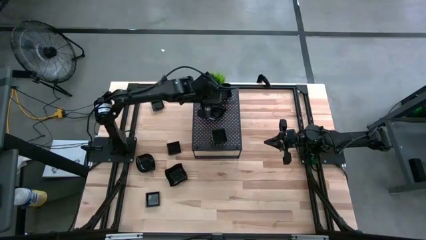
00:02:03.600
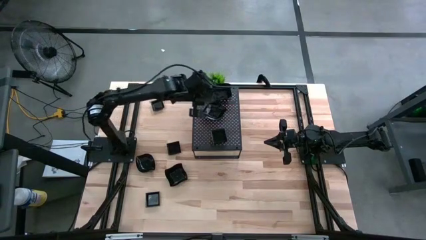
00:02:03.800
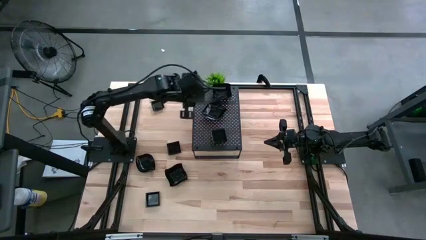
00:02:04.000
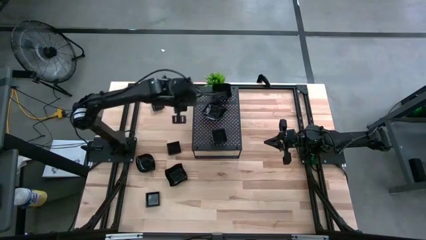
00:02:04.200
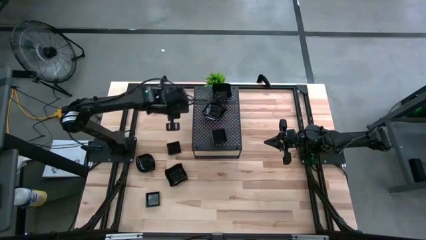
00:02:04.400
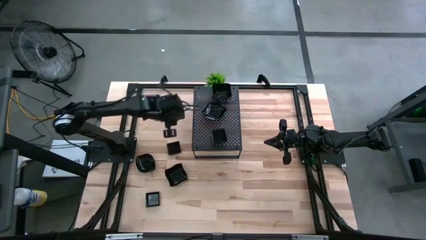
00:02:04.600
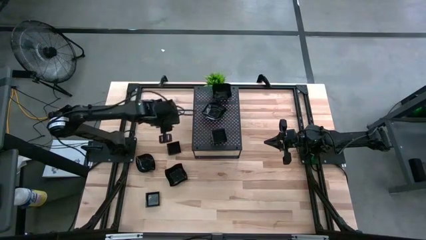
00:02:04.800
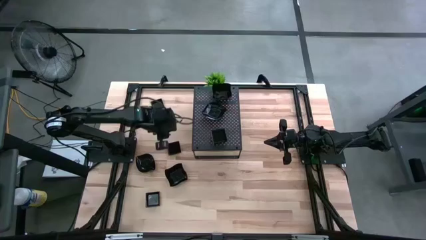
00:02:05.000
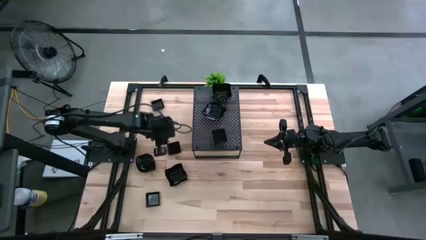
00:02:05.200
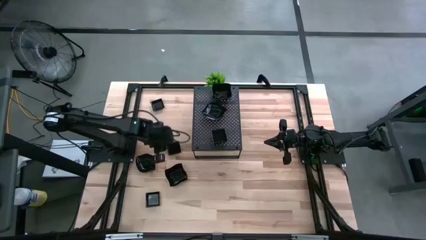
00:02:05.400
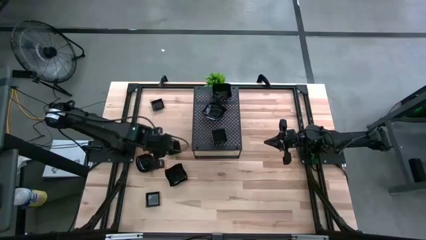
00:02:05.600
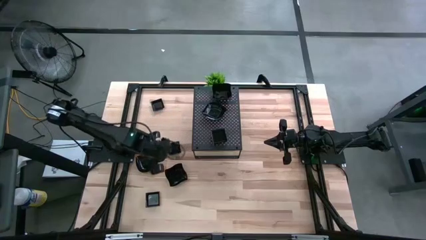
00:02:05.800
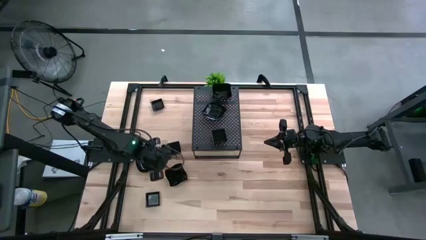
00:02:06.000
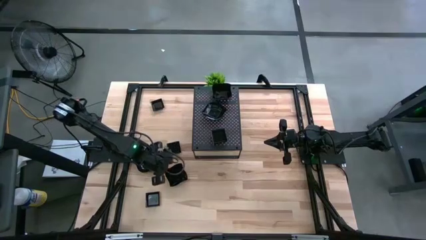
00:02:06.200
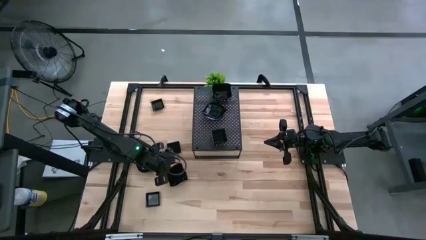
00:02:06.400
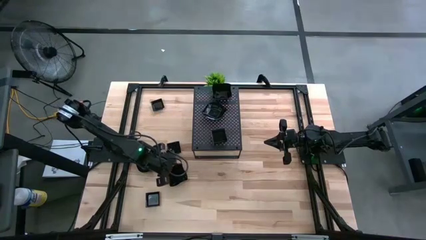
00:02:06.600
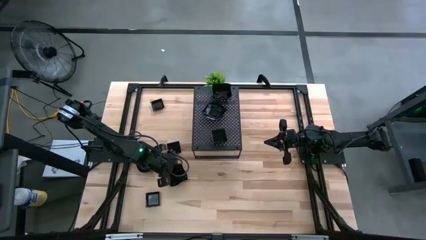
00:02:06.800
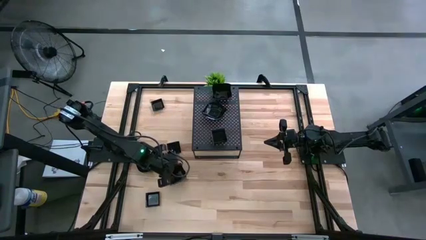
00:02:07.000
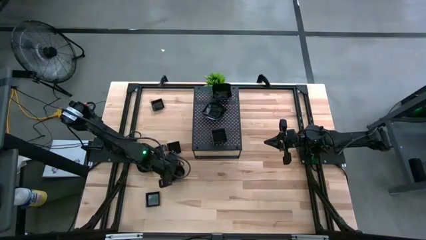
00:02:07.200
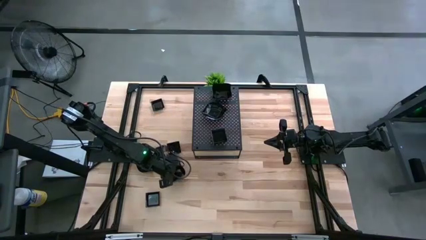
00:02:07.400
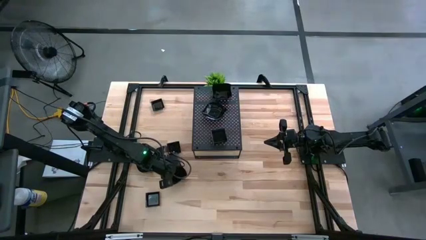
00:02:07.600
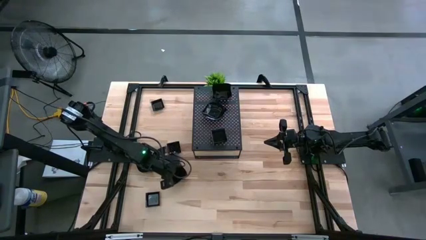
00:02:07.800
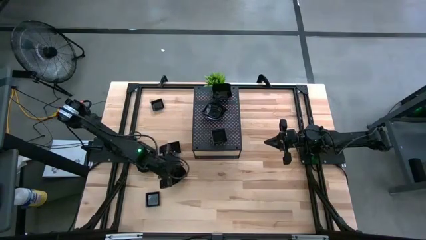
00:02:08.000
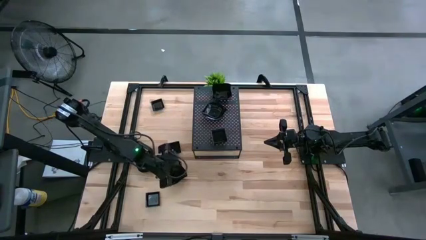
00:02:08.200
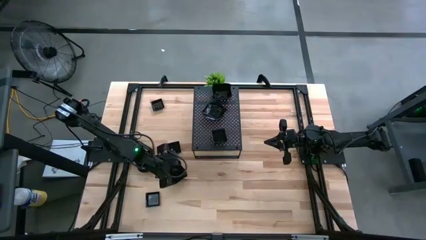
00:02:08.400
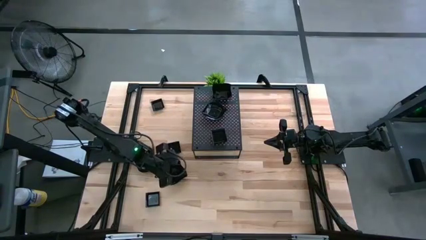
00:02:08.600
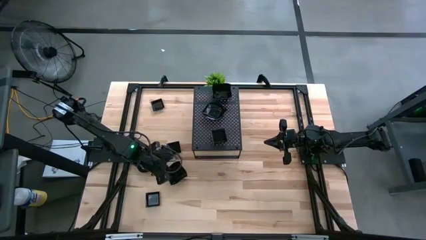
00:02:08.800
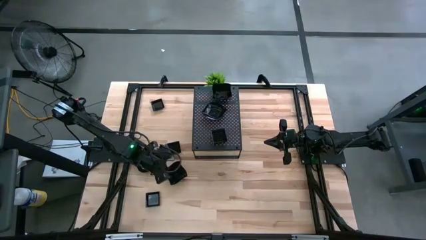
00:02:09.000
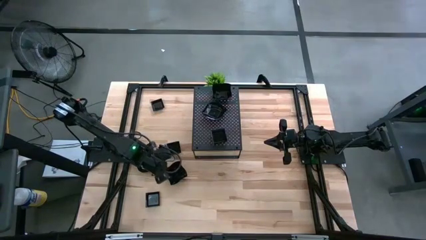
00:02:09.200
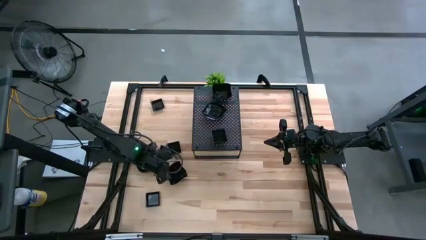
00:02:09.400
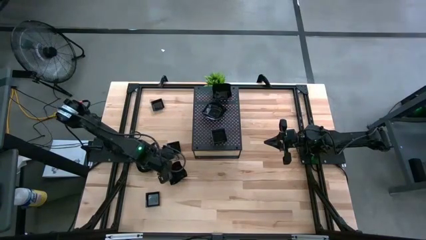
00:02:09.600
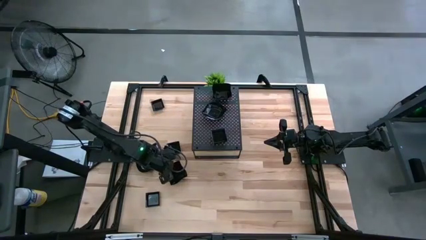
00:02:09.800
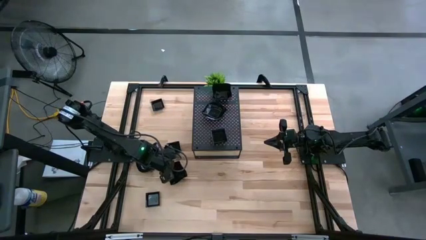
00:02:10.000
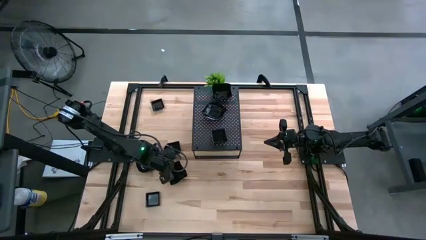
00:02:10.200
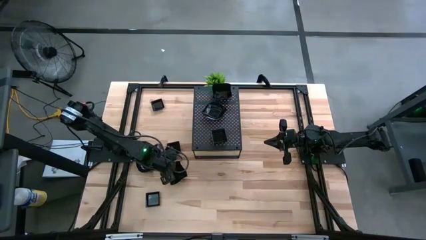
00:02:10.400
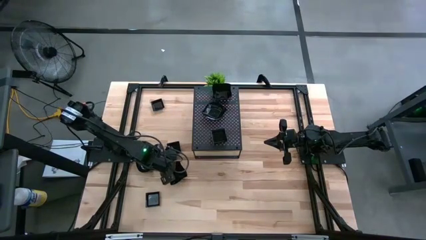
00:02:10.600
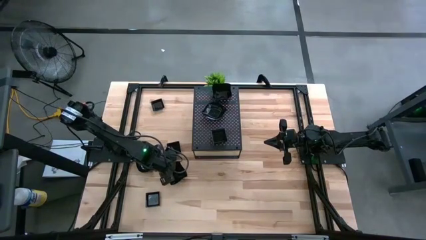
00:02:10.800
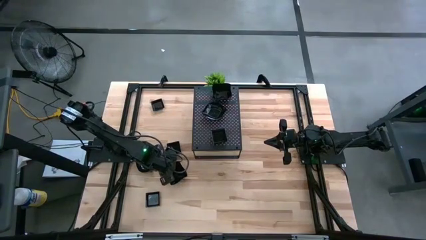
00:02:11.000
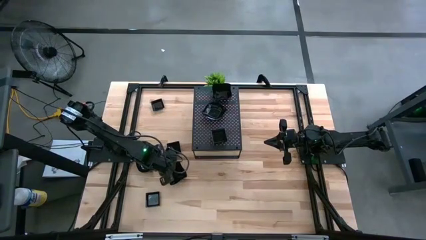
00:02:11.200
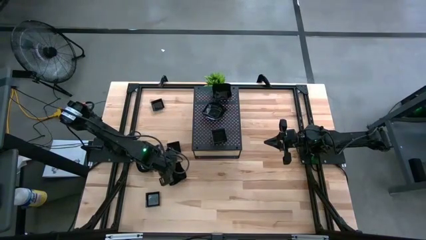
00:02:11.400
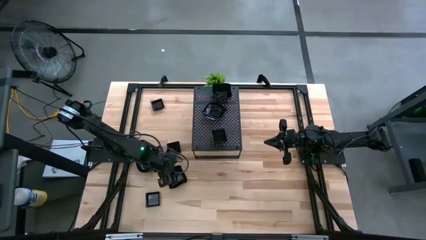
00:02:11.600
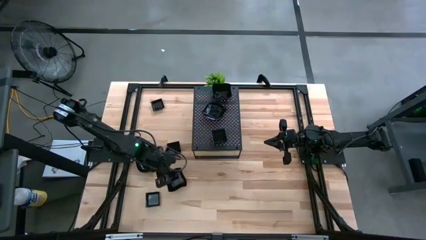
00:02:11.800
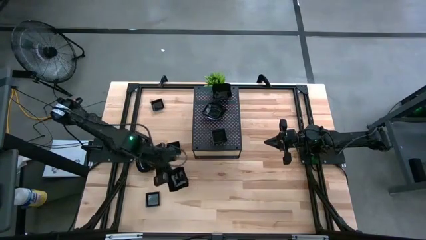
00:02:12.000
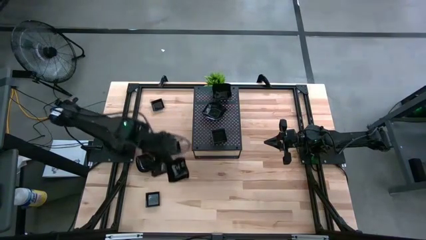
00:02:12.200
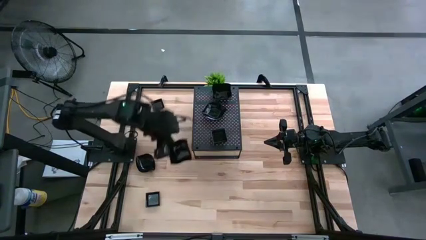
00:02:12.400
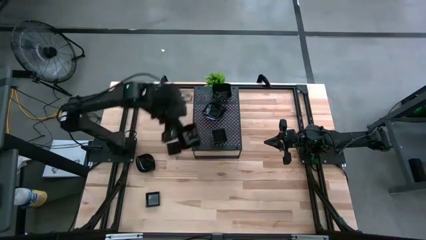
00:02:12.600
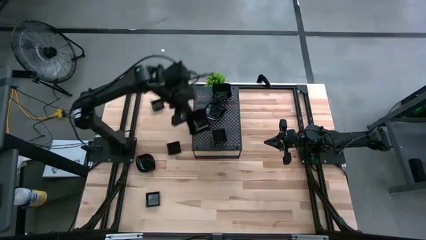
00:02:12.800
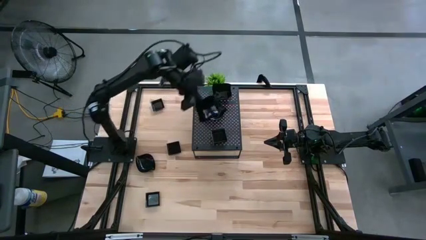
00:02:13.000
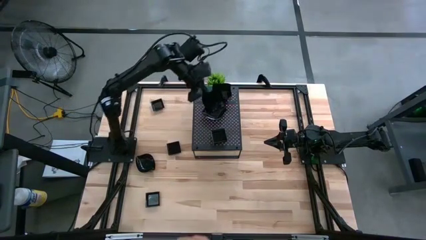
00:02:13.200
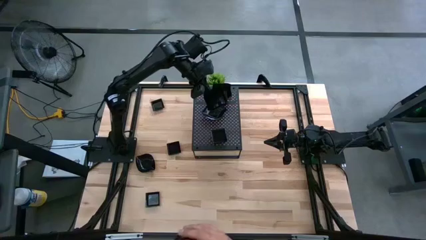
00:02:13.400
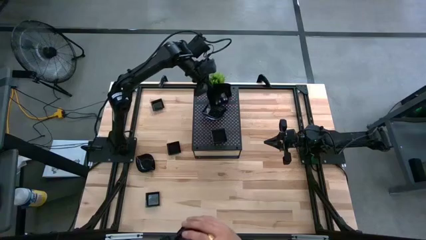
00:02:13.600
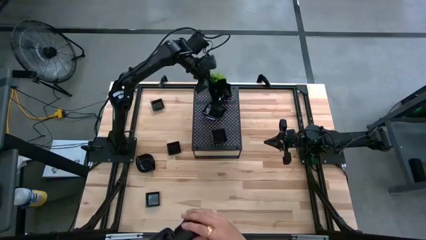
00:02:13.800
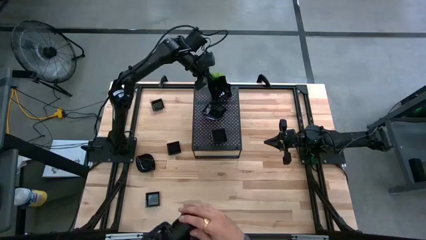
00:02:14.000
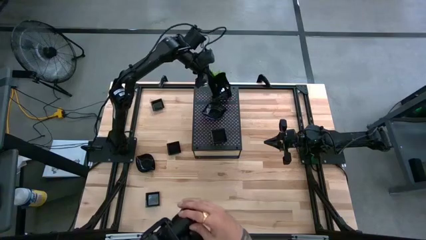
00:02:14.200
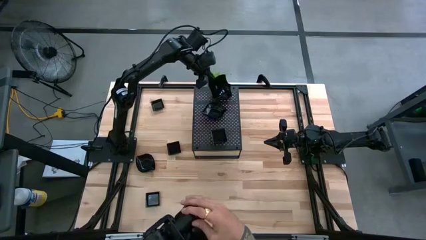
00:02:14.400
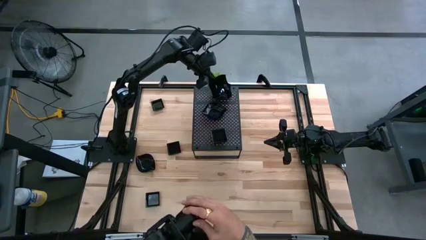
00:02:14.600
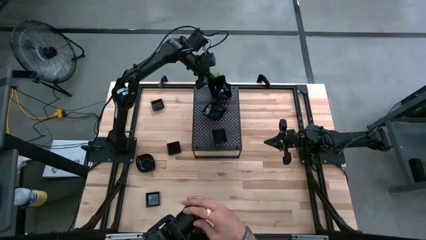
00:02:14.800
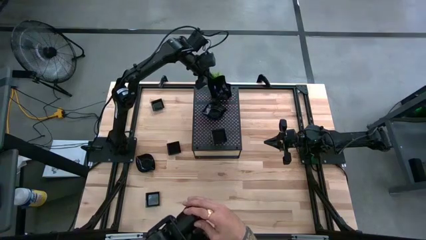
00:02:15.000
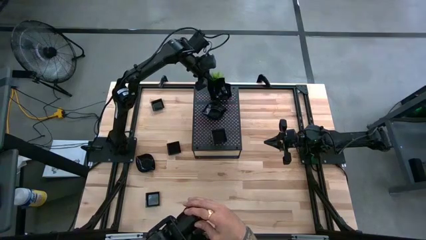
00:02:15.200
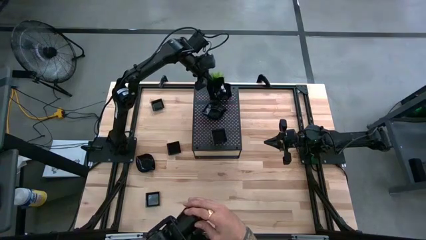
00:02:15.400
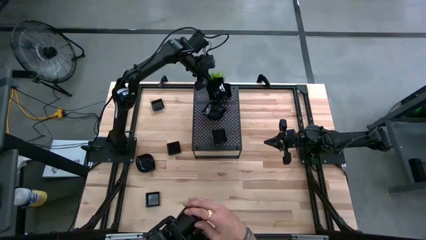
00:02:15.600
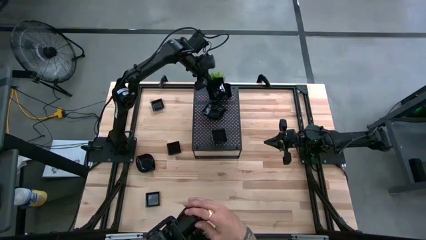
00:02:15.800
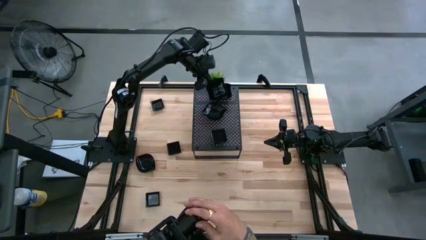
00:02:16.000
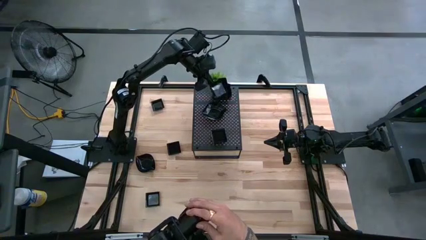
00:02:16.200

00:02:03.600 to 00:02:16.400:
Task: Pick & Place Mini shaped plates
Stack the distorted square plate on top of the distorted square plate on the shelf

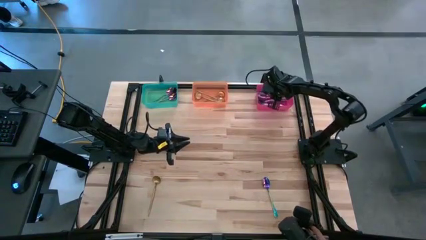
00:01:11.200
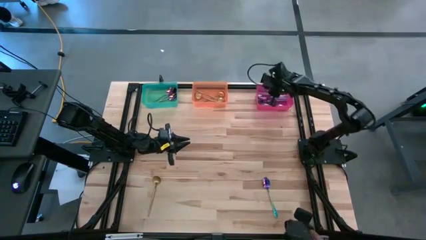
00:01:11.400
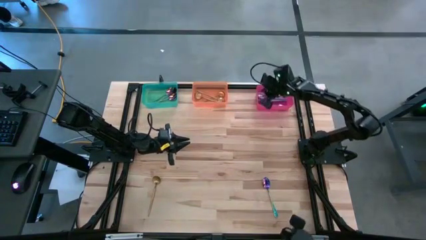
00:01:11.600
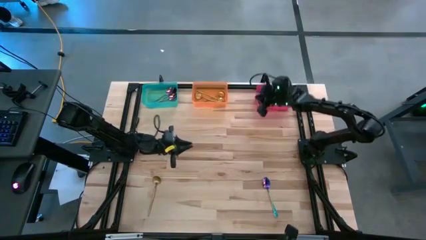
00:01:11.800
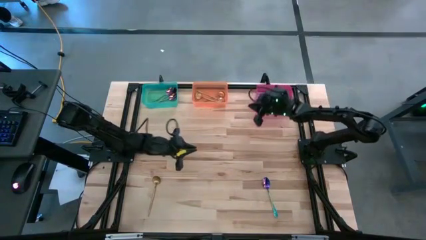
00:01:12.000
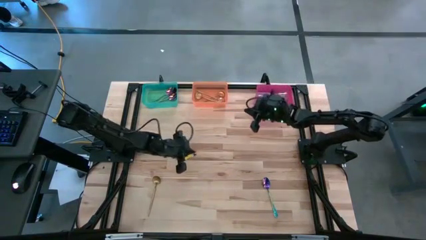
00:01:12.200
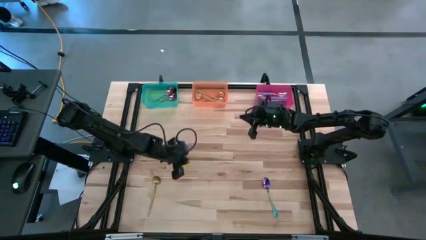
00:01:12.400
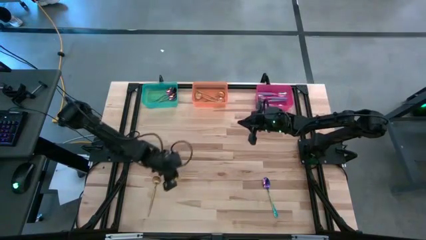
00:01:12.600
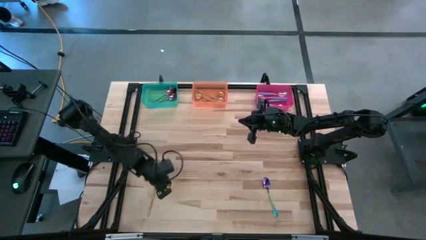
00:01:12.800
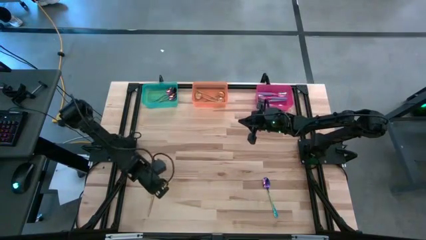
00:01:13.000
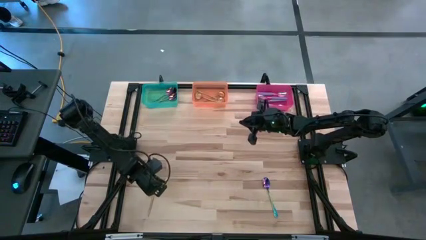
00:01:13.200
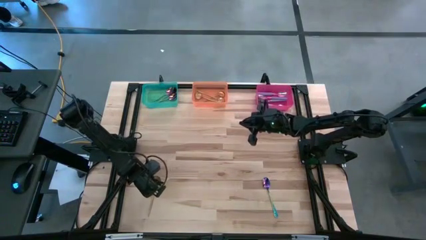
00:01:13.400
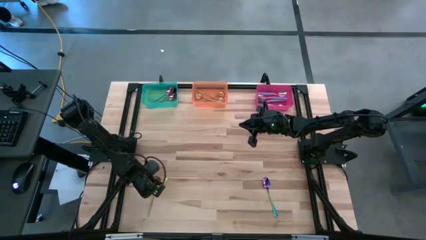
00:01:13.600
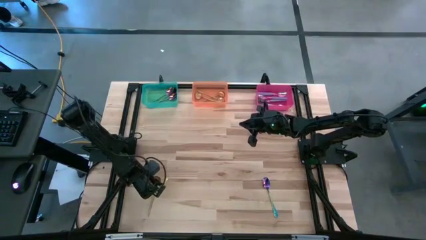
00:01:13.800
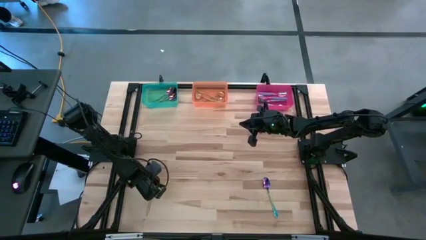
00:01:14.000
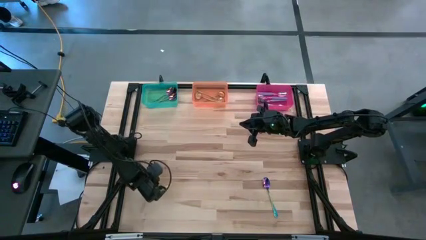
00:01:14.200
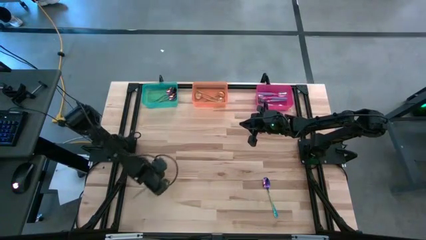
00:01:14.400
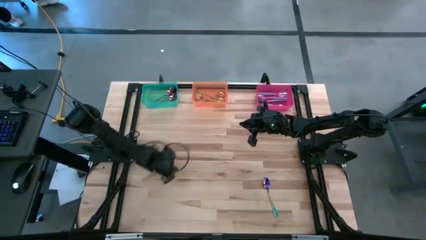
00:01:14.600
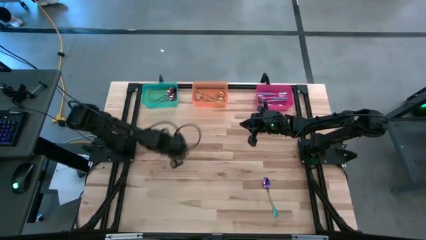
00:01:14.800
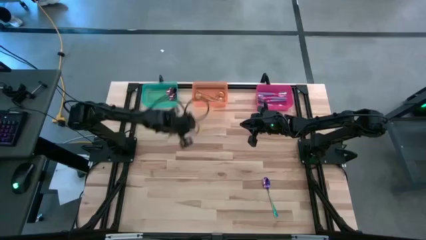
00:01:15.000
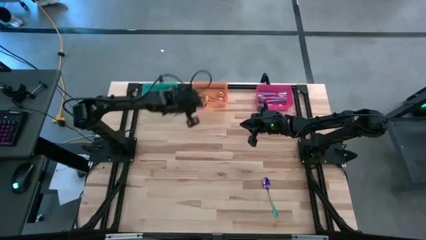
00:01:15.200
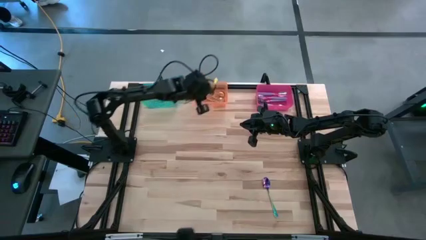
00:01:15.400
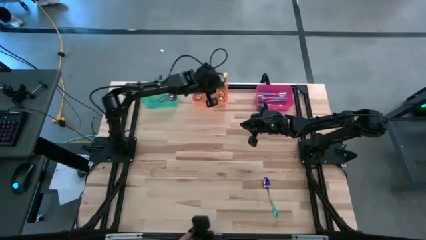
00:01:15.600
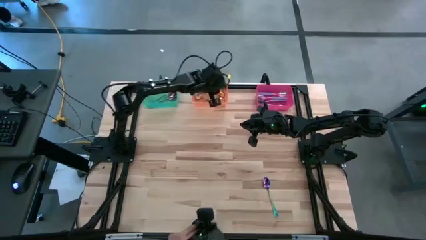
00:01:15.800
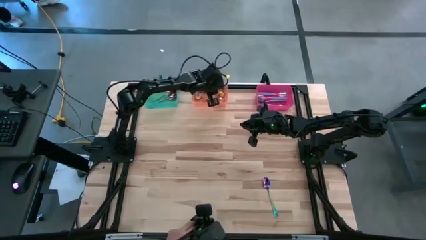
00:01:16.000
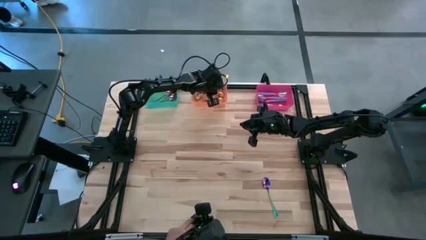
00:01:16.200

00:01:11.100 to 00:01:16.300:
Task: Sort silverware by color (type)
Put the gold spoon into the orange bin
